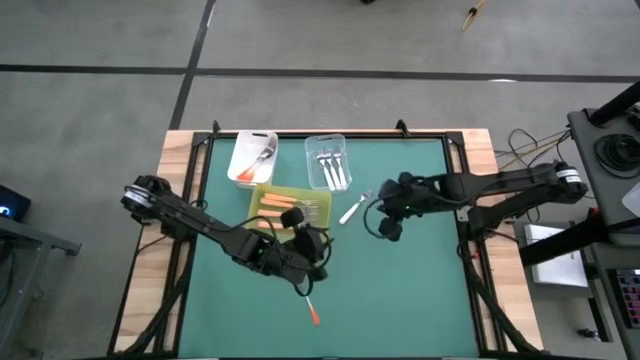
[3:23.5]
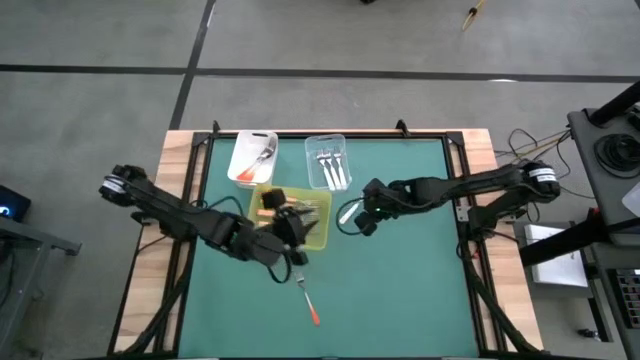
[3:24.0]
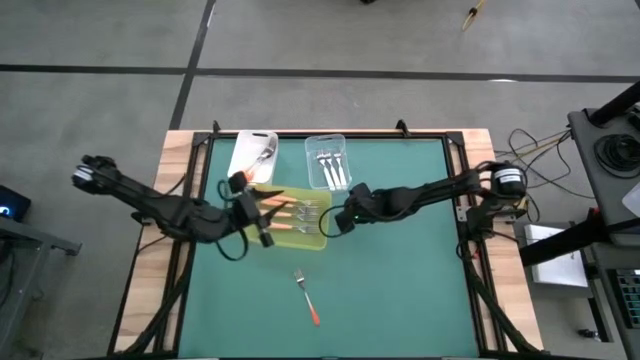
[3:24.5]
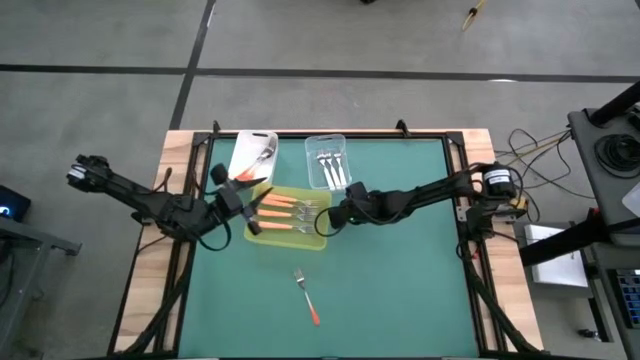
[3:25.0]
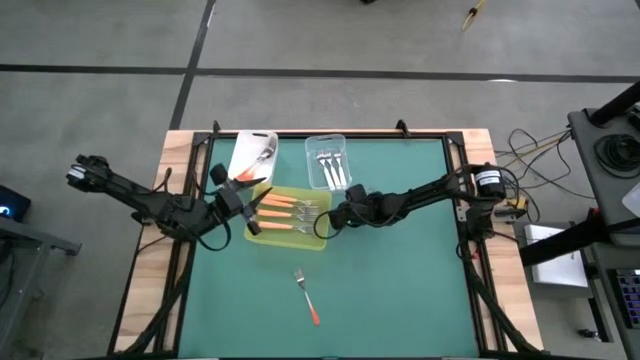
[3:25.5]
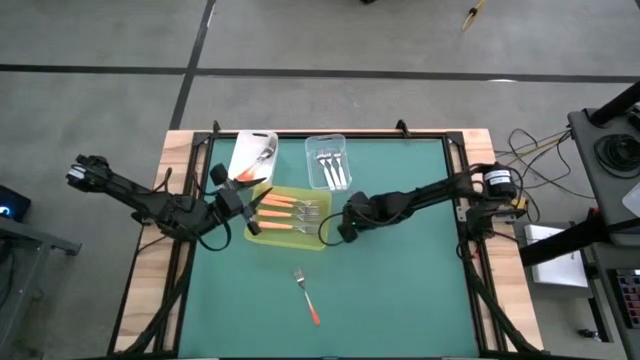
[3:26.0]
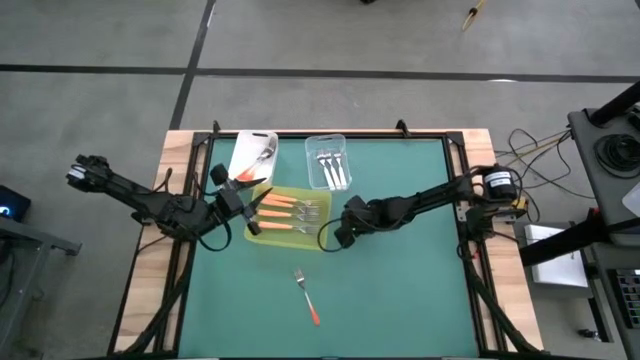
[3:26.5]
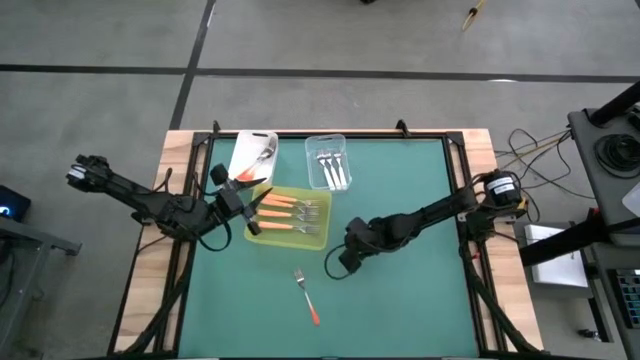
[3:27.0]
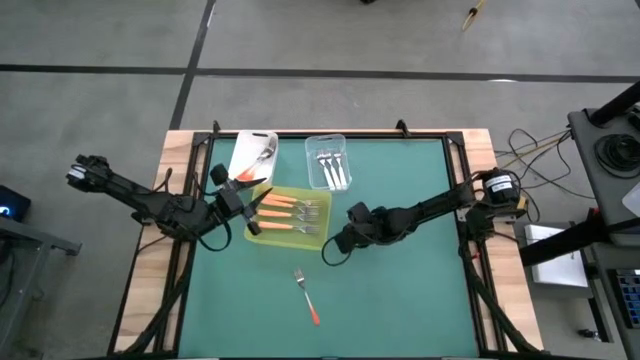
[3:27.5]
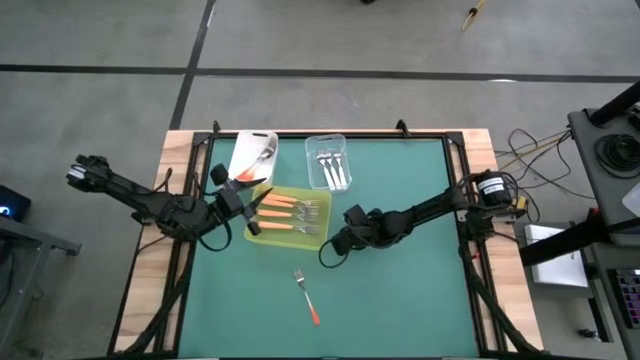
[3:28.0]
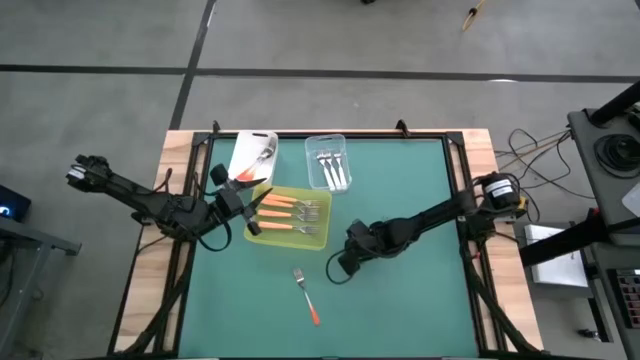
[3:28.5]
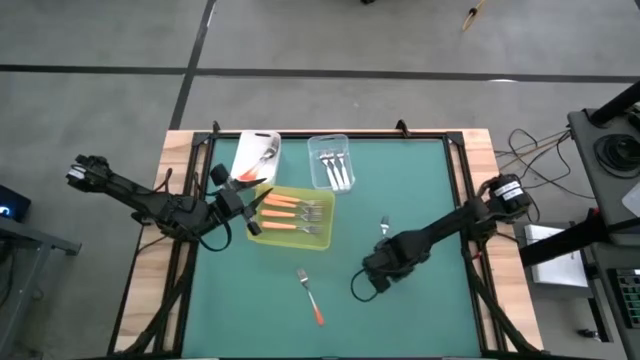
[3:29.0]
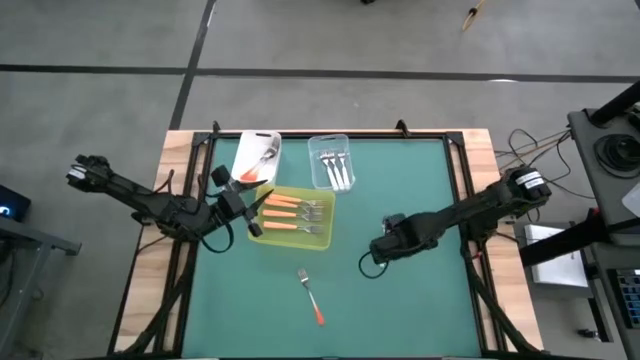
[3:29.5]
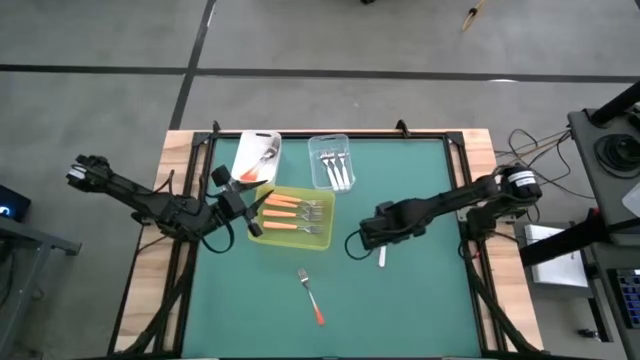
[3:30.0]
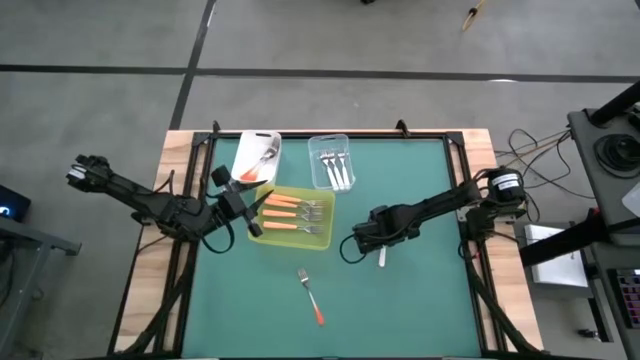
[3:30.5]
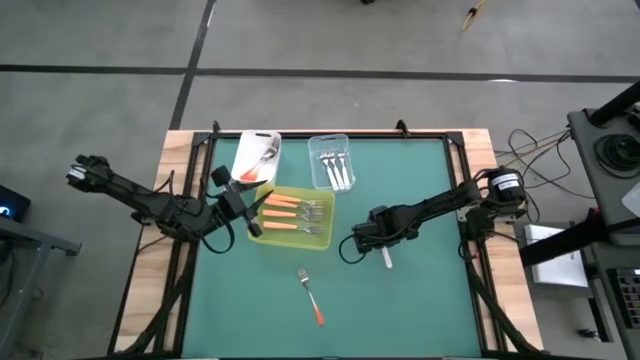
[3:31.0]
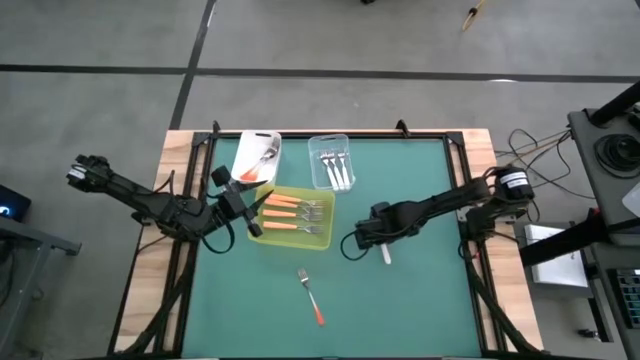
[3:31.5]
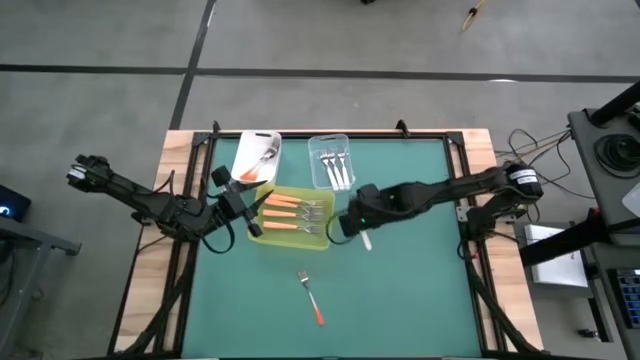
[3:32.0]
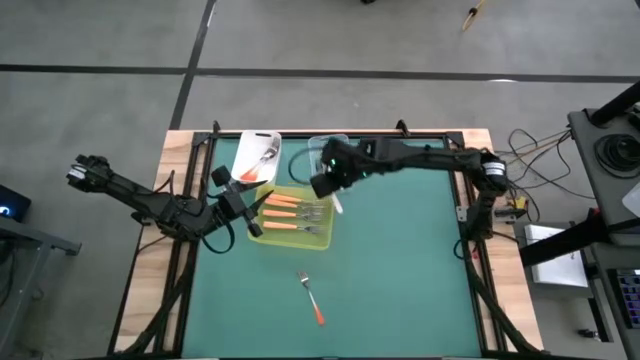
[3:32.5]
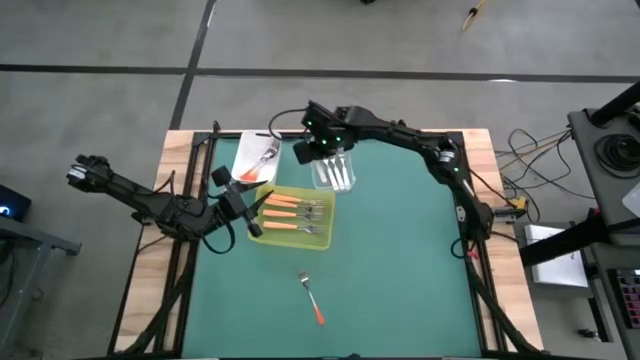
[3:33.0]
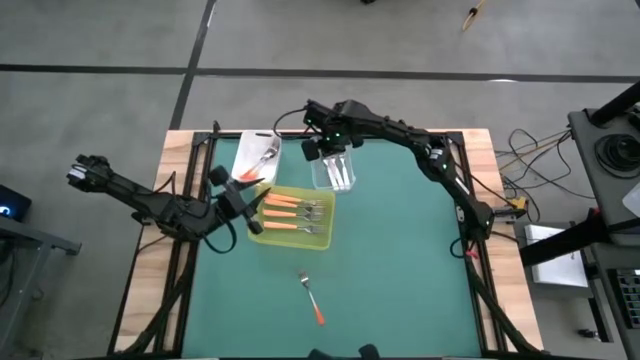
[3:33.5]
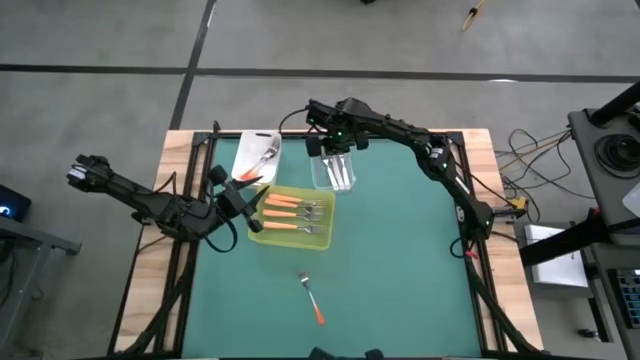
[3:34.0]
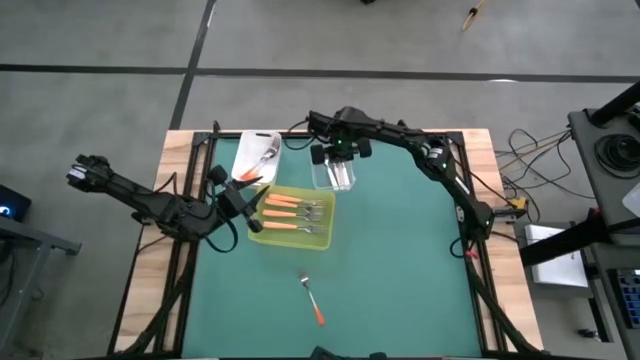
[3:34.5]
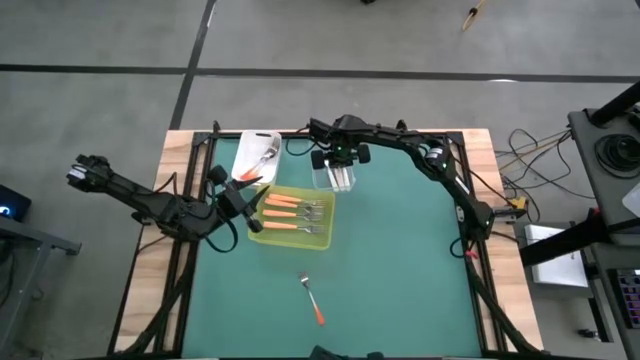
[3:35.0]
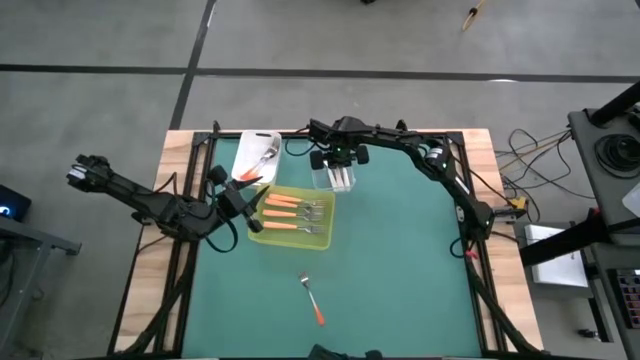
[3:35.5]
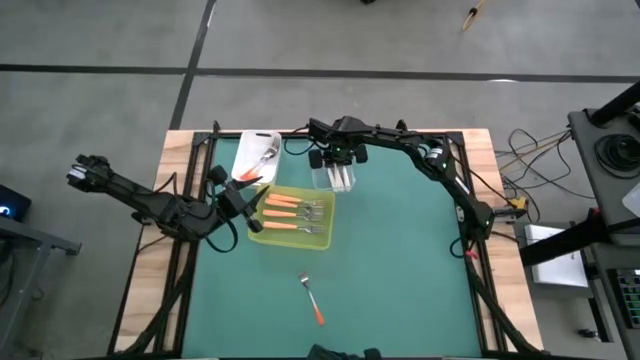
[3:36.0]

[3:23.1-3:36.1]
Task: Sort silverware by color (type)
Put the white fork into the transparent bin

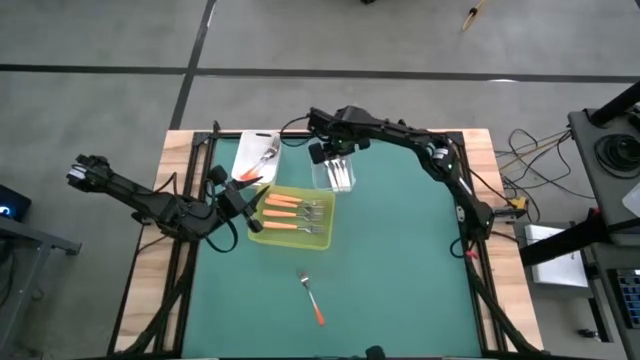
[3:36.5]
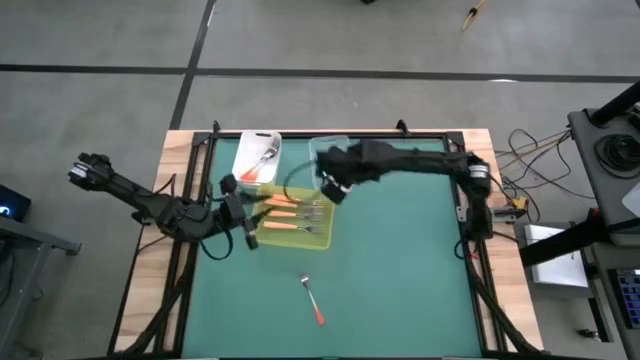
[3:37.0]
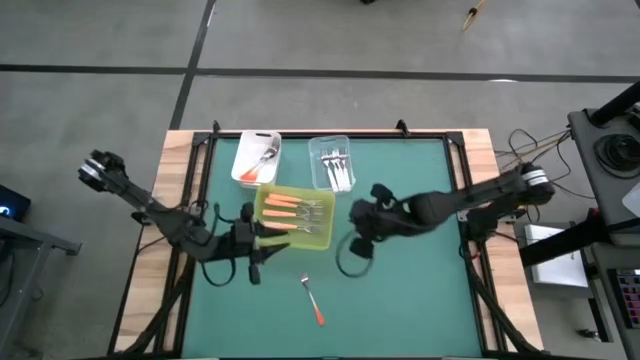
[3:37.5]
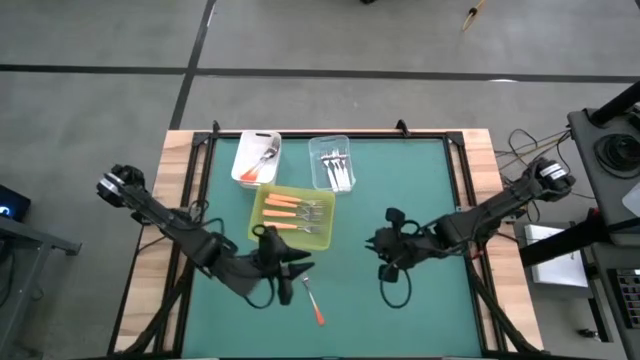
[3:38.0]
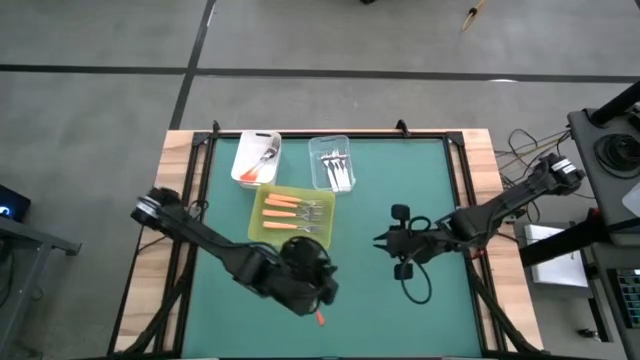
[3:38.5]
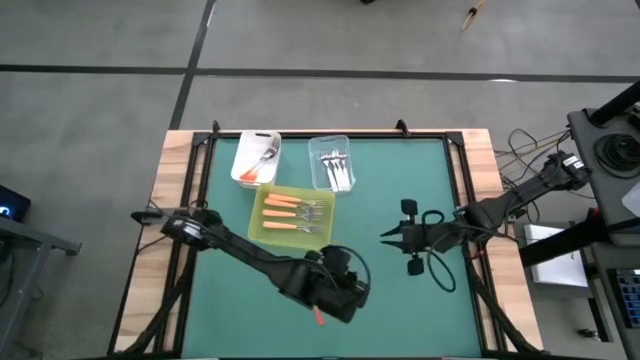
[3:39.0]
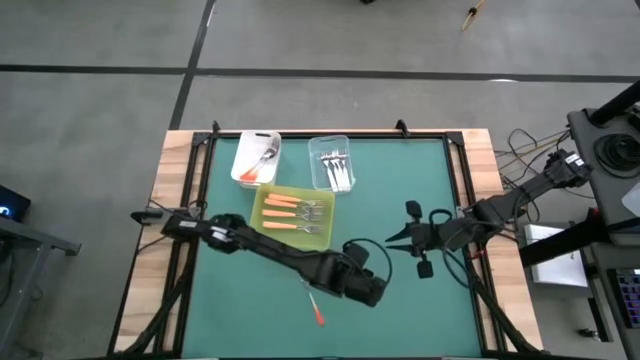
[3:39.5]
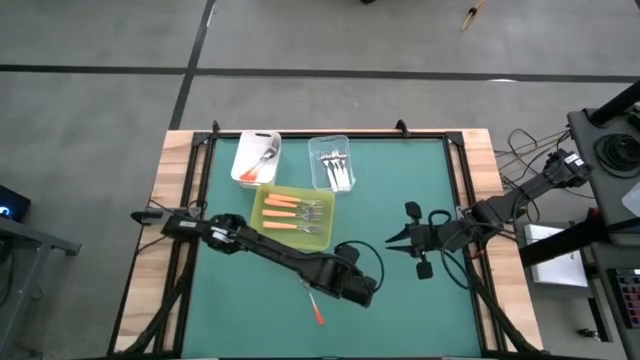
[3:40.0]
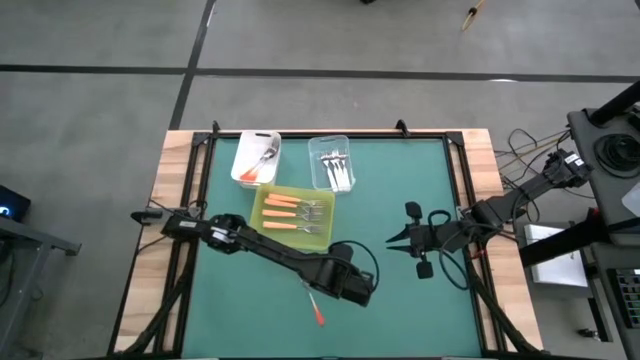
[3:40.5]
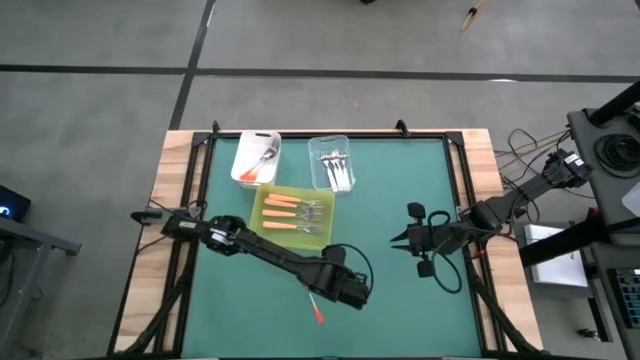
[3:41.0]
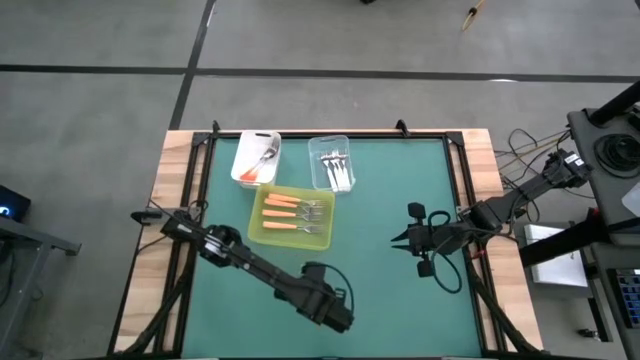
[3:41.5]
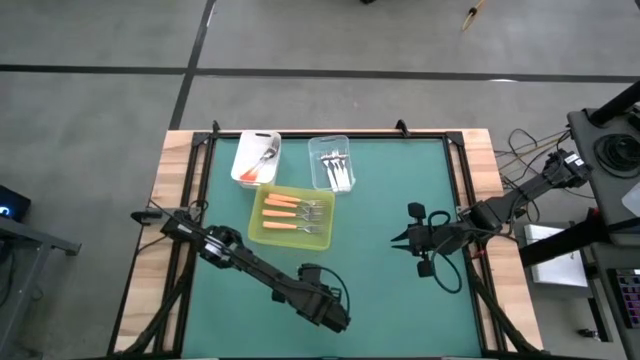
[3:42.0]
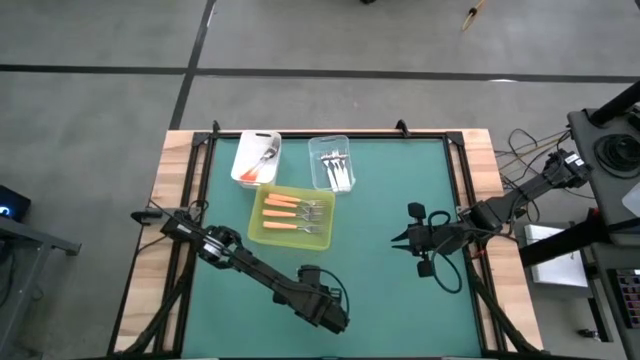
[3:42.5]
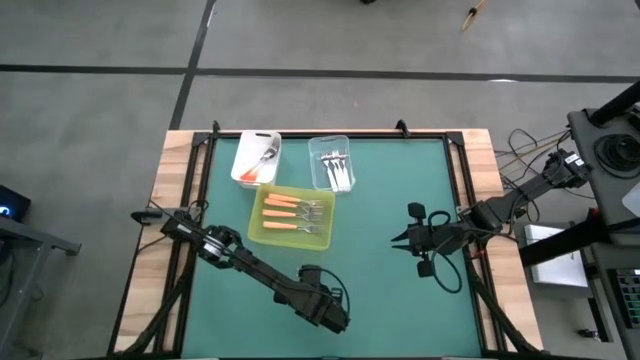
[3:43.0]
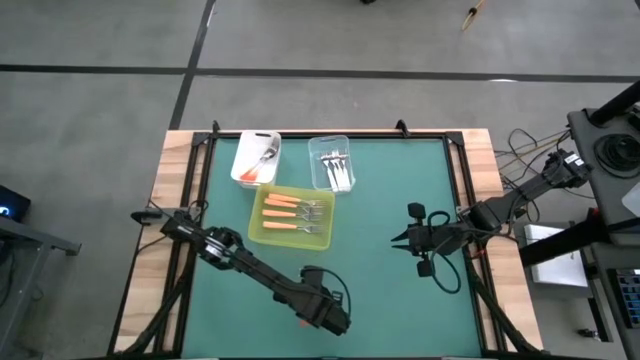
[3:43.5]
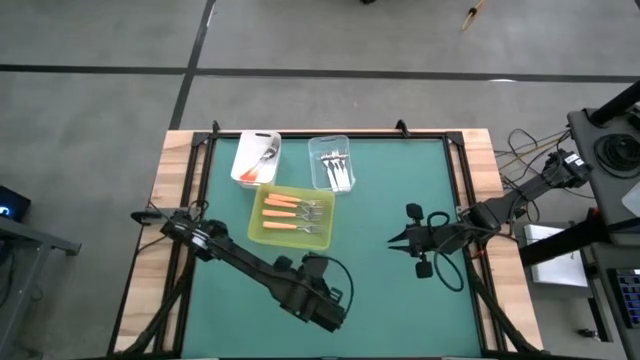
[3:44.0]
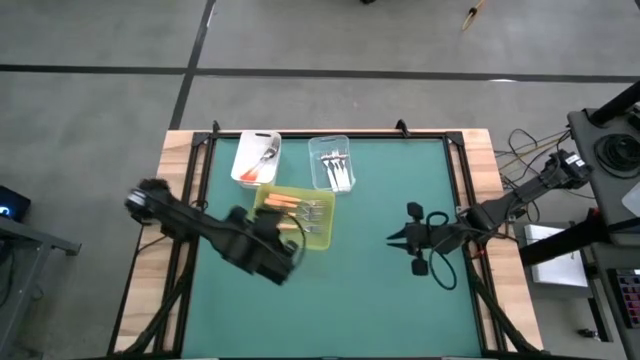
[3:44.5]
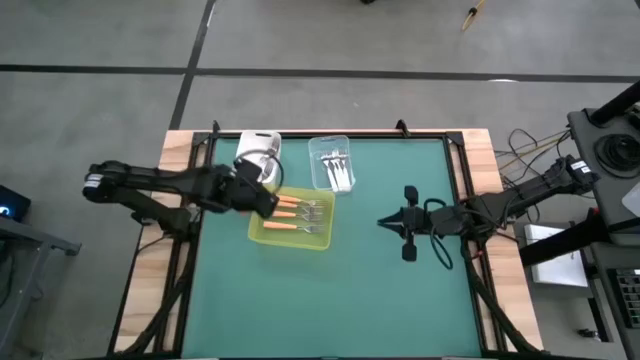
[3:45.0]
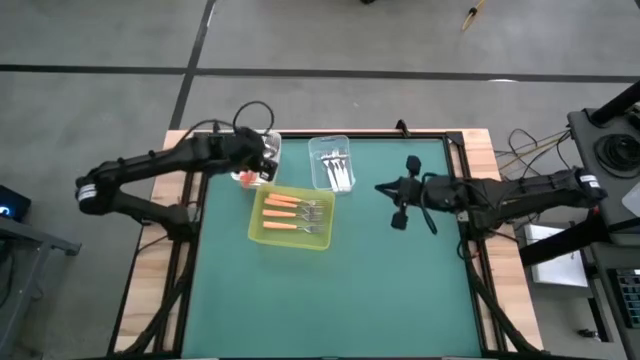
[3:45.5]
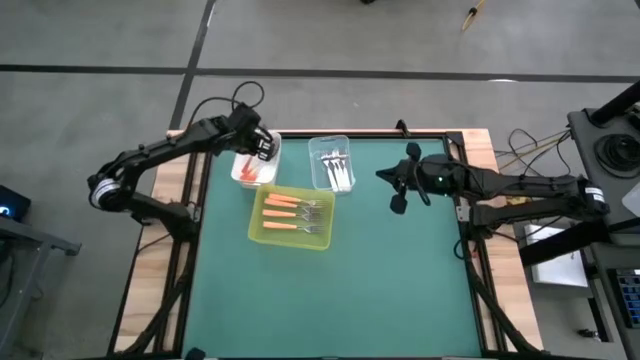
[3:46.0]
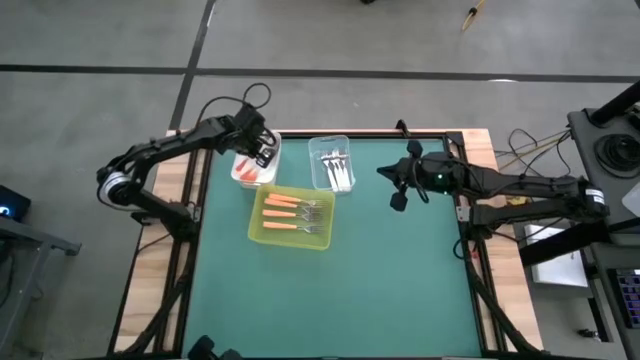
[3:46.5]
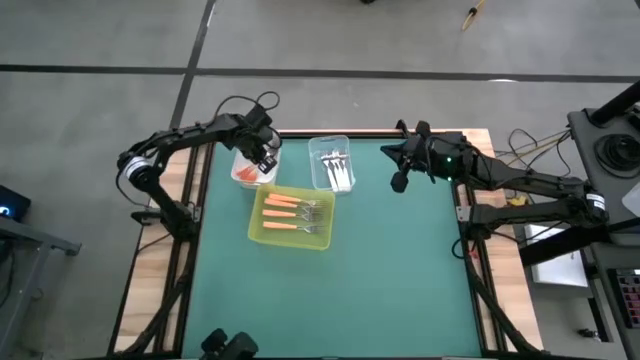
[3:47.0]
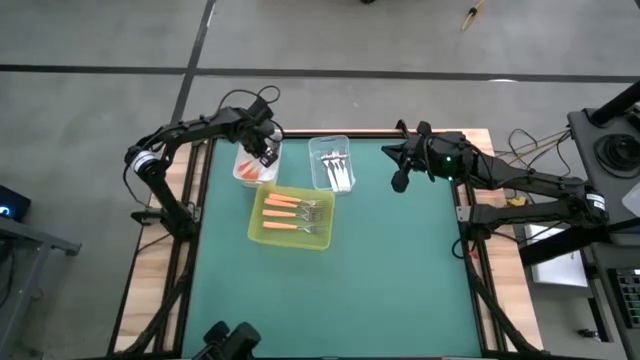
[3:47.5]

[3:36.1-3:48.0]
Put the orange fork into the white bin
